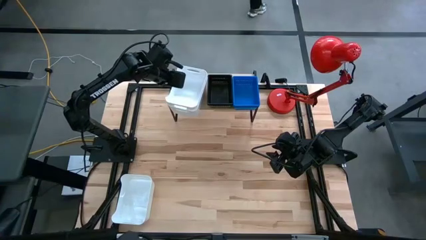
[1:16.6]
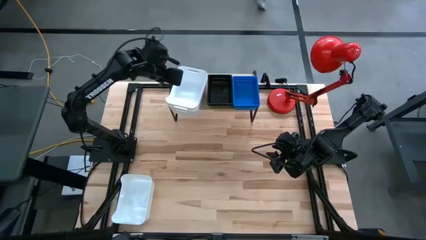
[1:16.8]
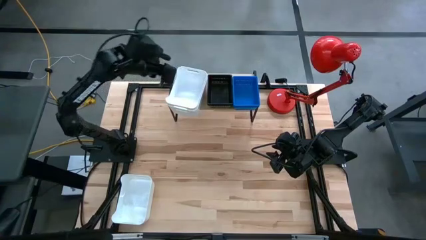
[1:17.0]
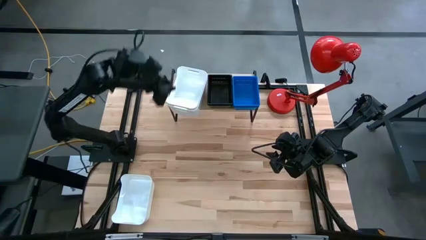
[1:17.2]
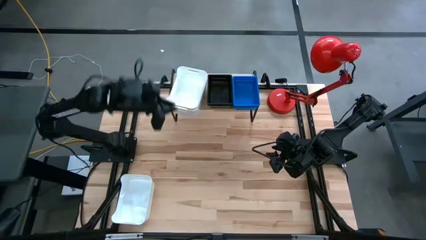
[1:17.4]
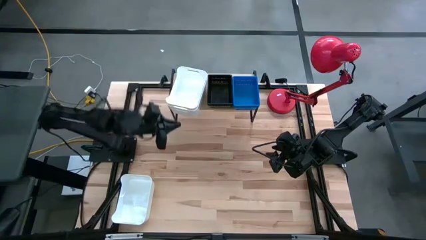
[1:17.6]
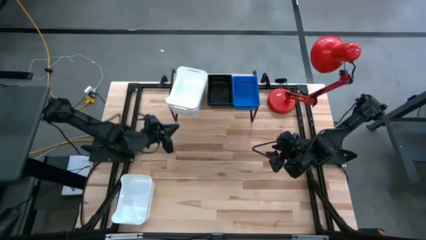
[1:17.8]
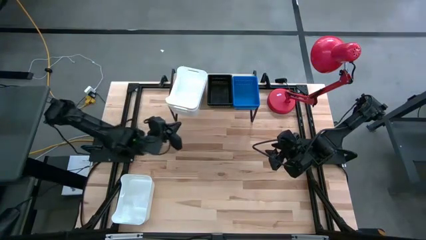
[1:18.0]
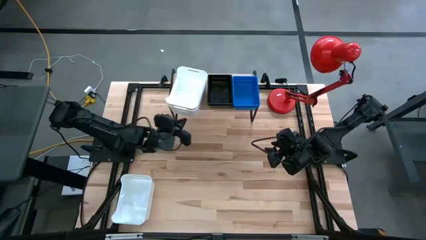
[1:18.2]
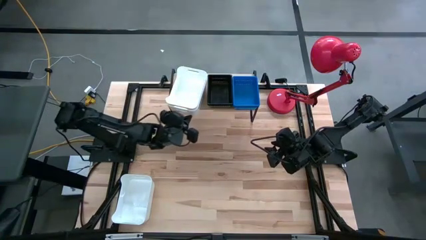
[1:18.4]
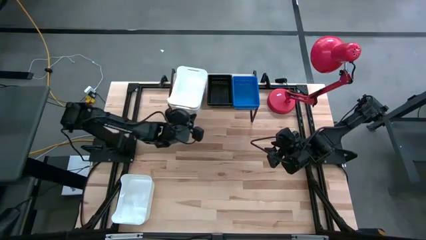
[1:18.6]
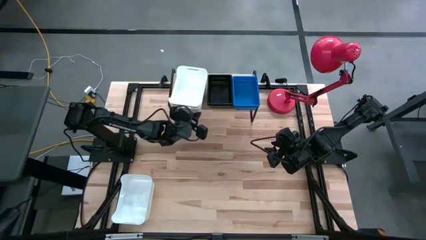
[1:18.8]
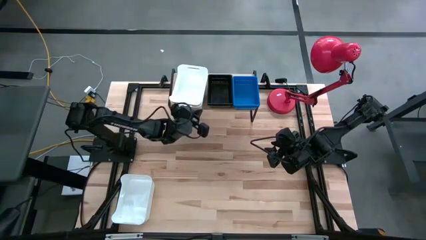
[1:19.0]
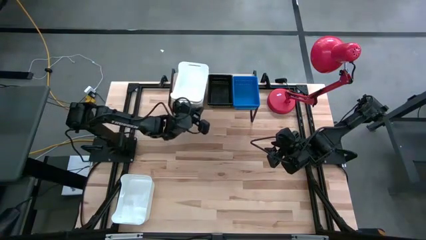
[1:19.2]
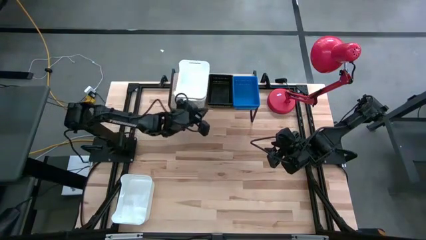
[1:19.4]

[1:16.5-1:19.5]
Task: Stack baskets on shelf by color
Adjust the white bins on the shelf

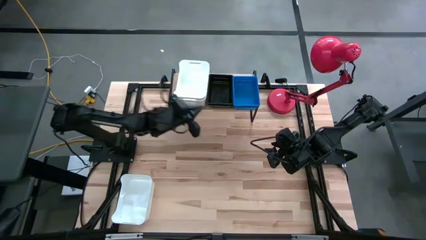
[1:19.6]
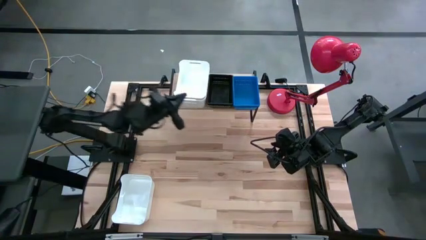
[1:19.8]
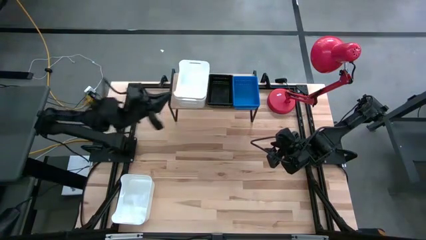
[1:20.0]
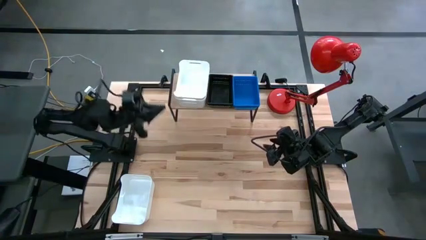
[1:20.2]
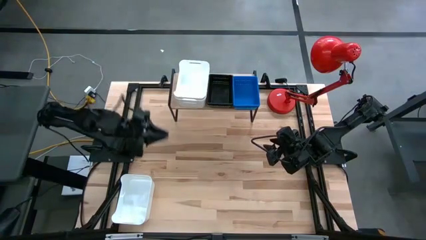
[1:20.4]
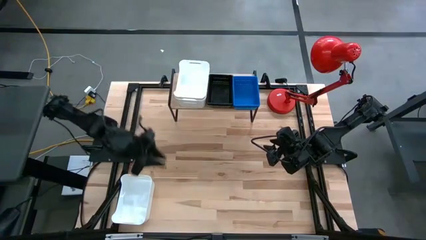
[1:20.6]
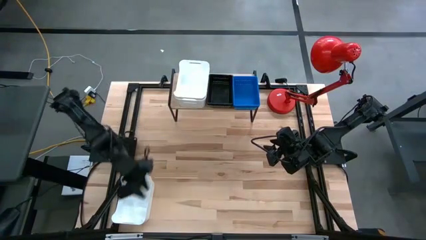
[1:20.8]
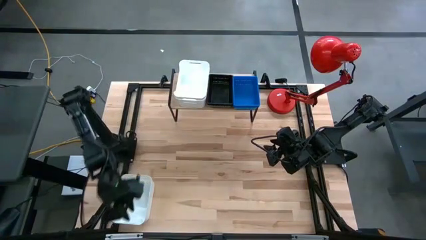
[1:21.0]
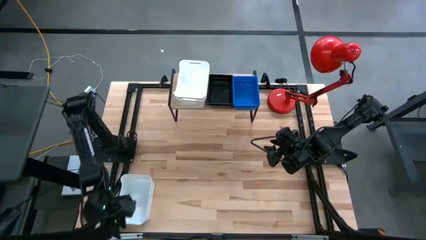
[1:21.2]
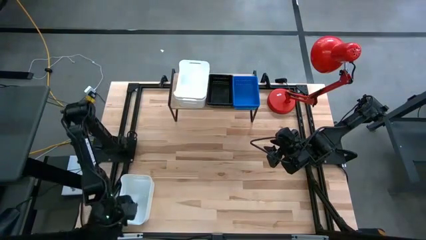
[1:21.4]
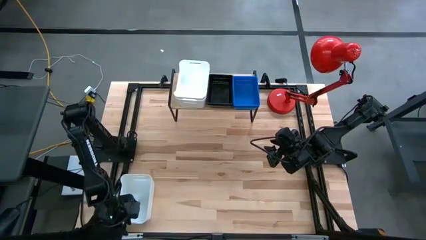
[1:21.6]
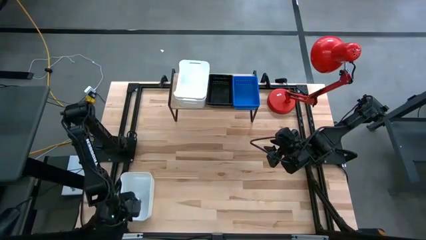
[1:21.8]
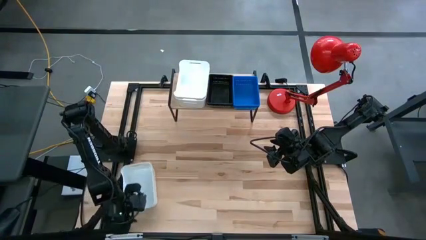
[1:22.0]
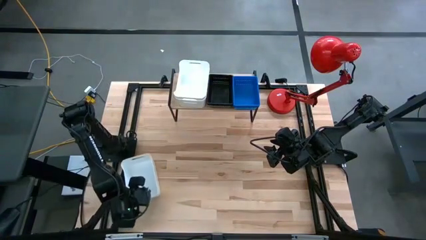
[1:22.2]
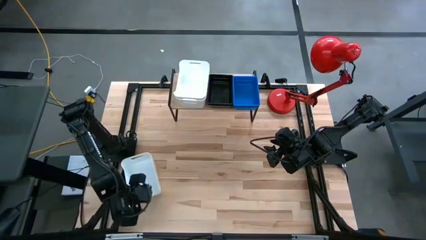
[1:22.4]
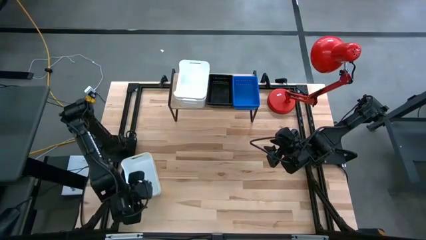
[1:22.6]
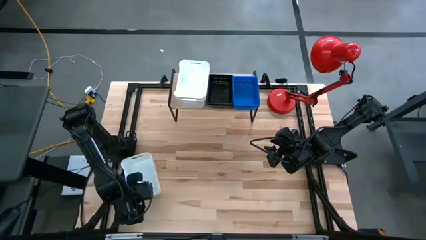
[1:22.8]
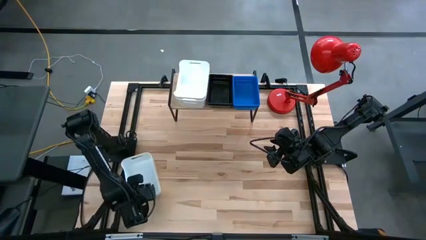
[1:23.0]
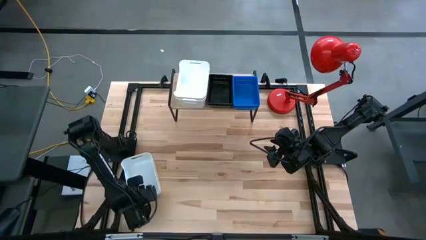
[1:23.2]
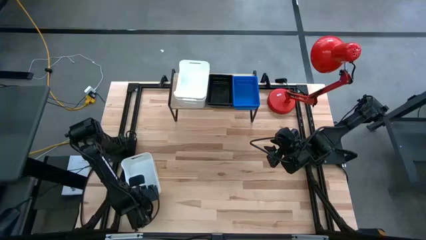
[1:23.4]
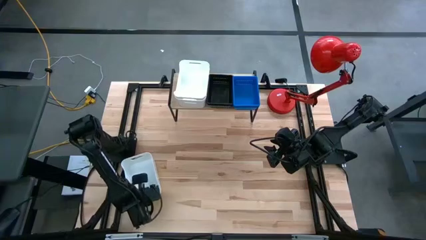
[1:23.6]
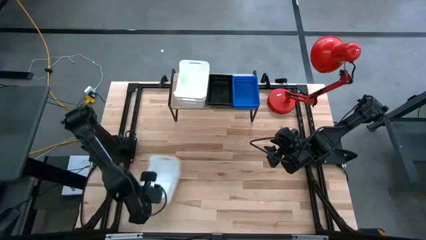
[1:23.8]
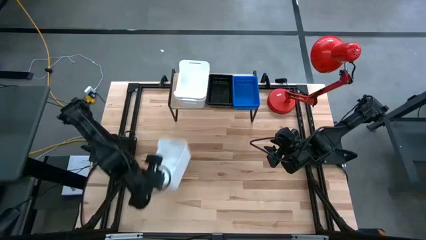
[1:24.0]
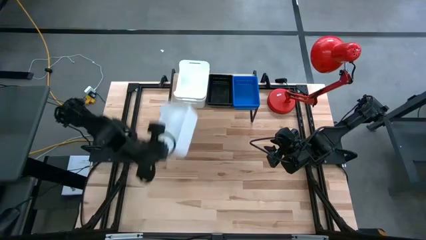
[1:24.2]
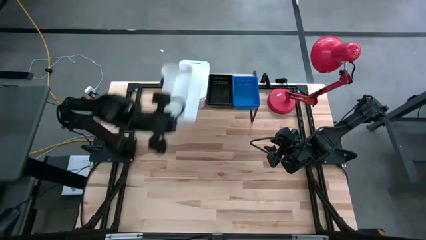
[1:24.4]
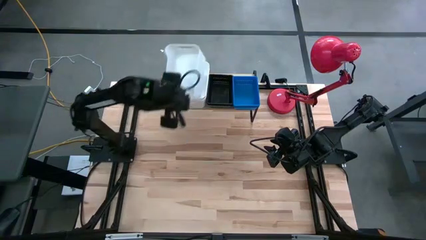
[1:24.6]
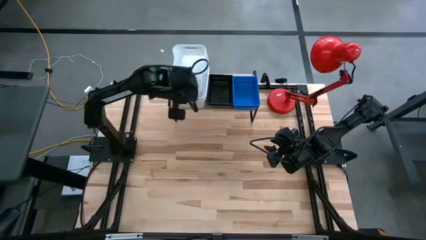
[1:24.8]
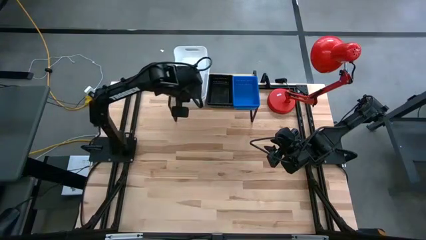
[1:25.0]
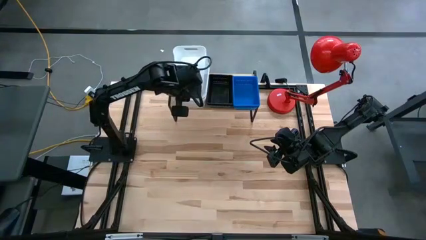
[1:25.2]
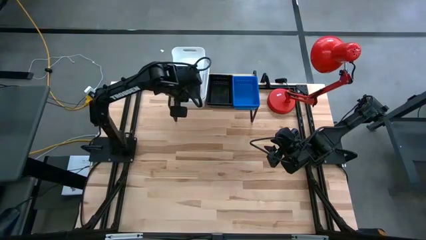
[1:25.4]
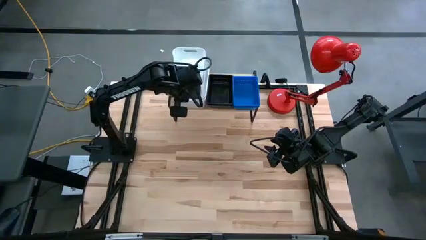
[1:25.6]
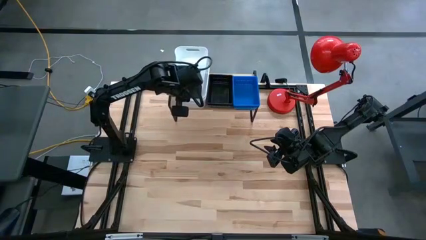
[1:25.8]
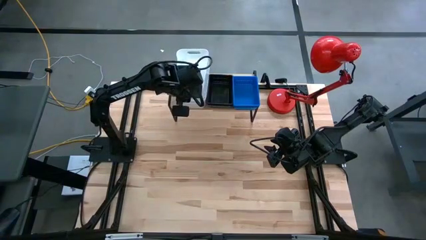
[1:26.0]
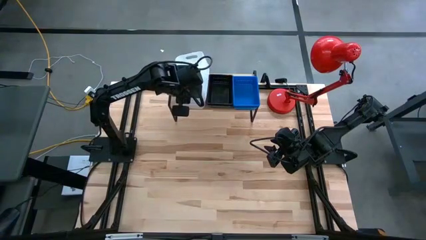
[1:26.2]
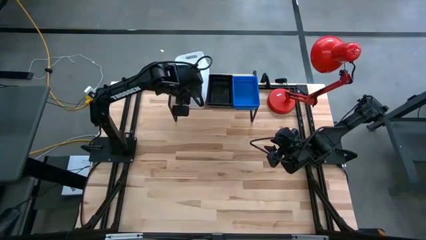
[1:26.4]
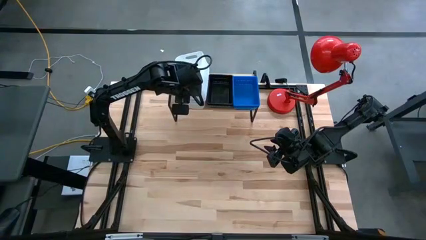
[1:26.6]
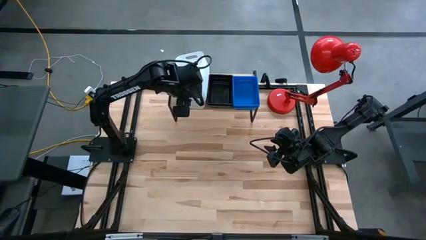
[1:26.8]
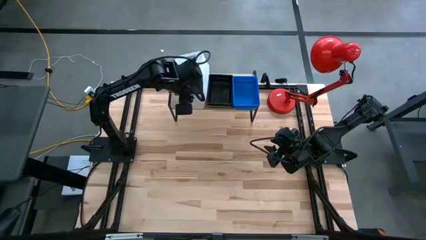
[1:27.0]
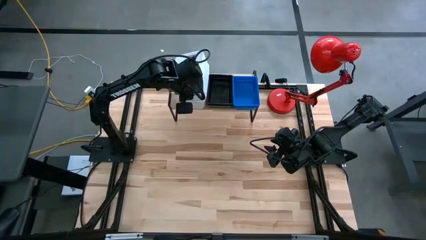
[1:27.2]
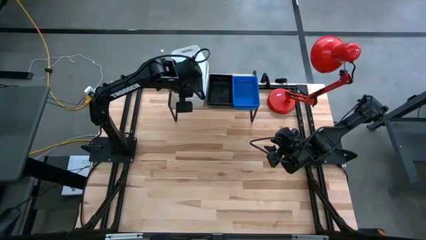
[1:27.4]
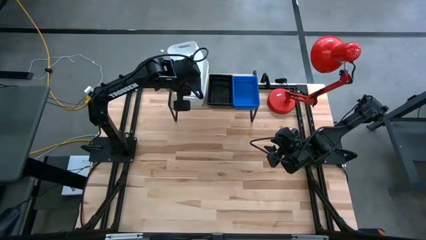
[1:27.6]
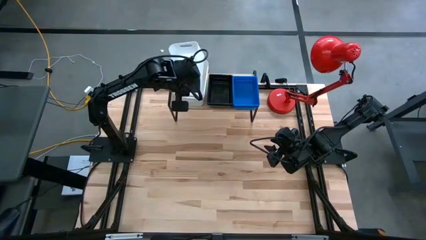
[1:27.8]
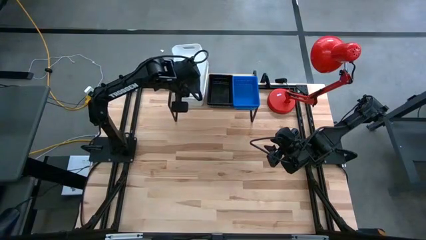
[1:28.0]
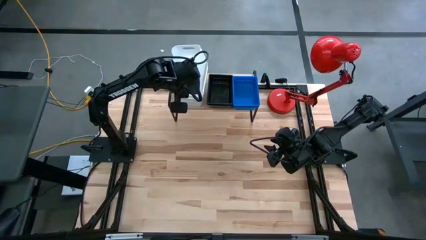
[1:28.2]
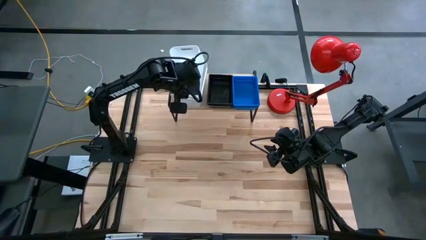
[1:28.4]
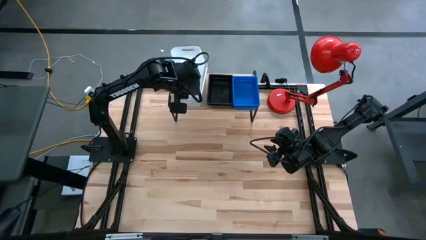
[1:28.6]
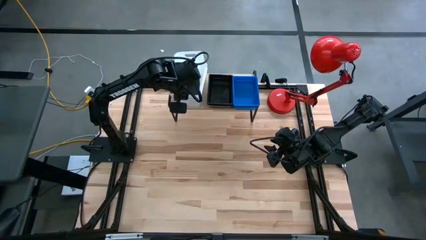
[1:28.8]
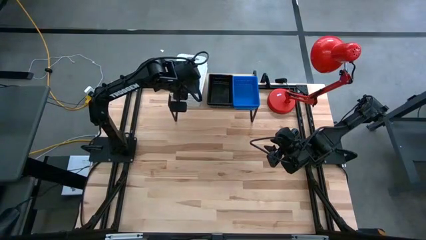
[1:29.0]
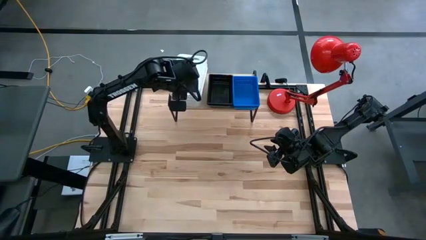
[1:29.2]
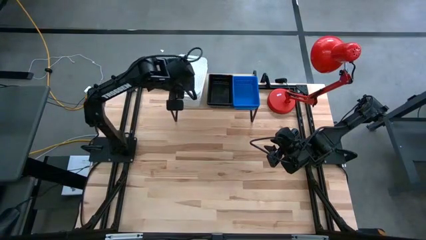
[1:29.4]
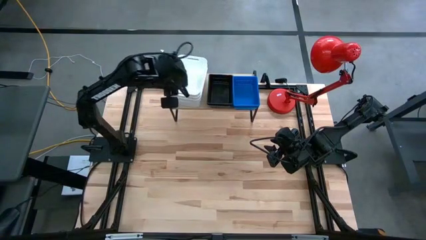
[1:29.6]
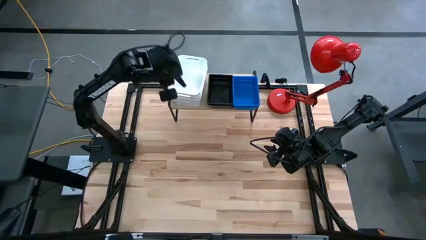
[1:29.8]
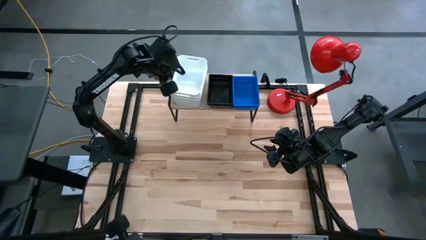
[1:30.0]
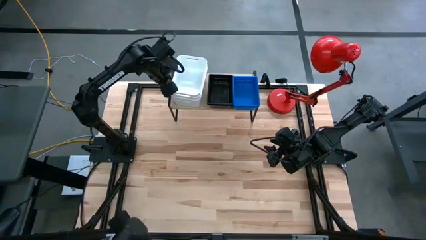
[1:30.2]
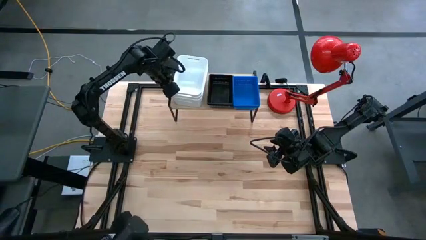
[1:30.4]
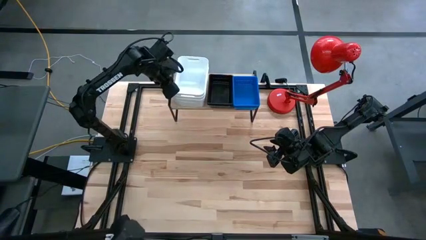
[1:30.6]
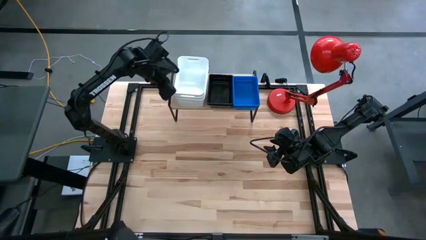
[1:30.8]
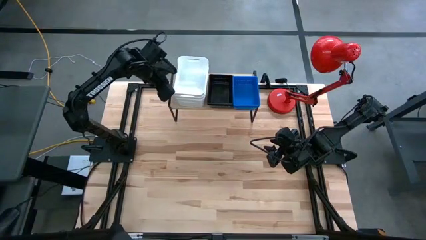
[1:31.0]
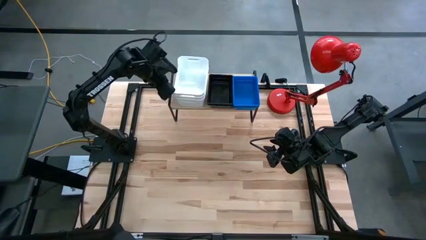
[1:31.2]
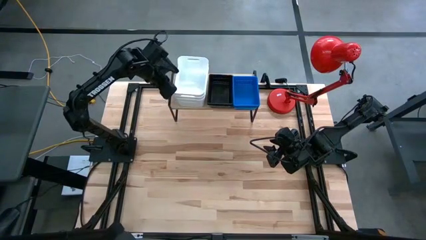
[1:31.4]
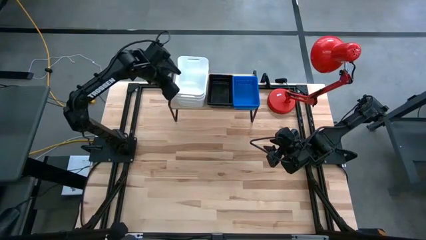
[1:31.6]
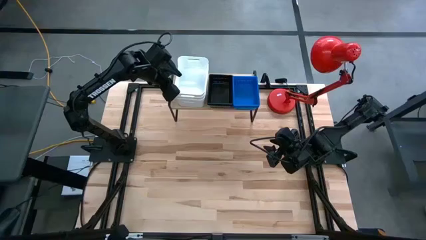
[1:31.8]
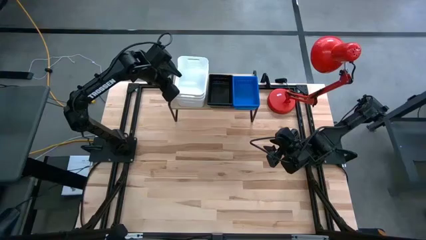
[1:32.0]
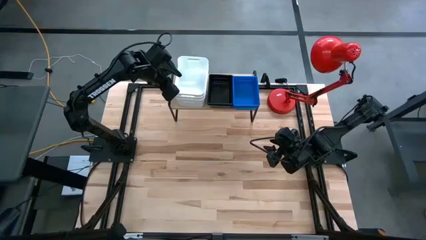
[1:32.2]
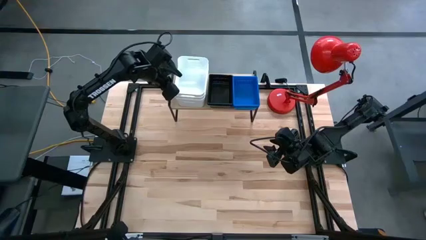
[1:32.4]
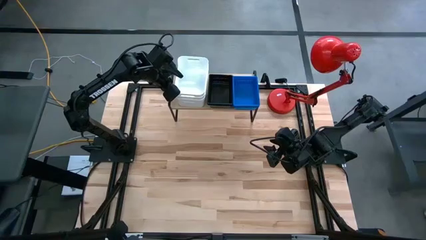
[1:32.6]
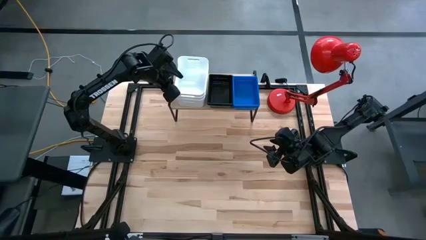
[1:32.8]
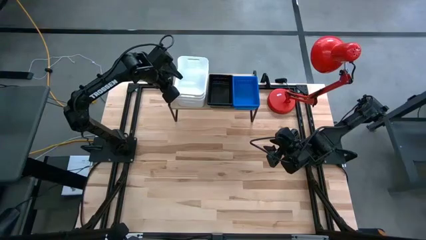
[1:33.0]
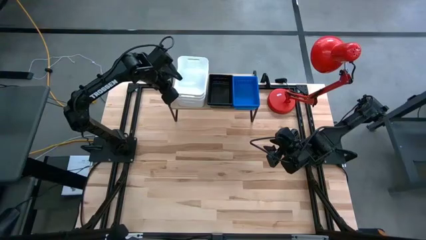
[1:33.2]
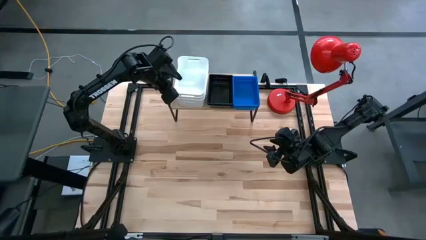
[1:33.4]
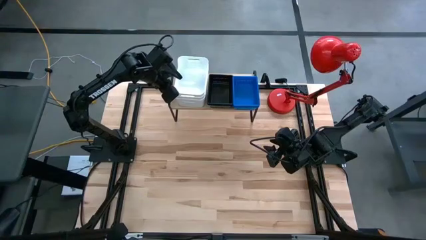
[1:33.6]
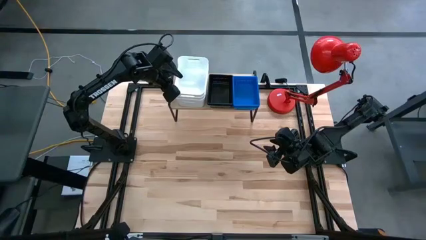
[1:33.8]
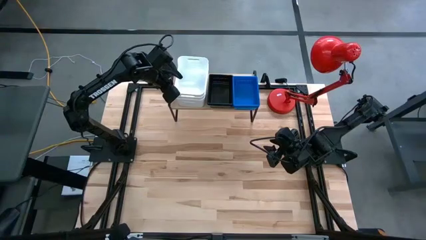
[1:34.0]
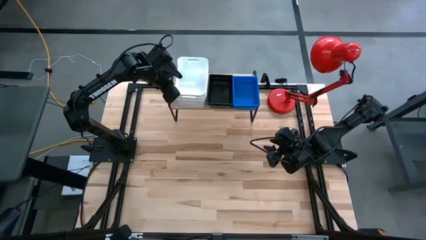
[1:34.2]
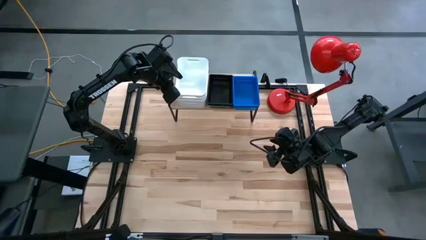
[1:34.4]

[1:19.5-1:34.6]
Stack the white bin on top of the other bins on the shelf
